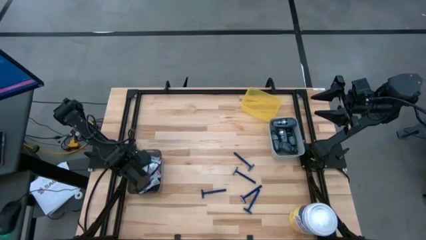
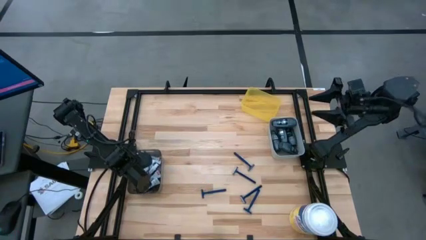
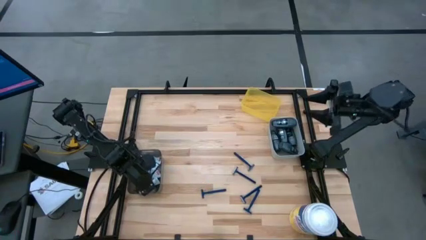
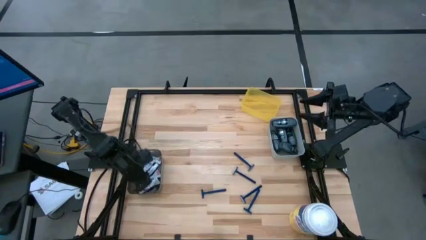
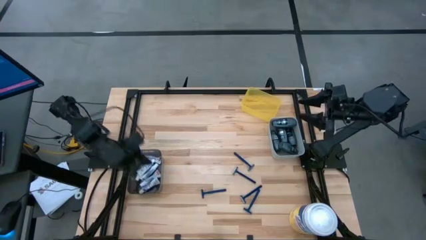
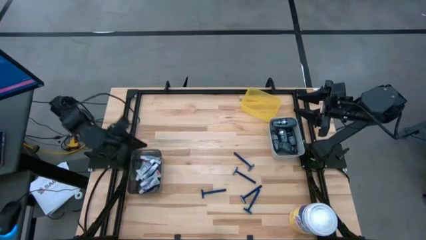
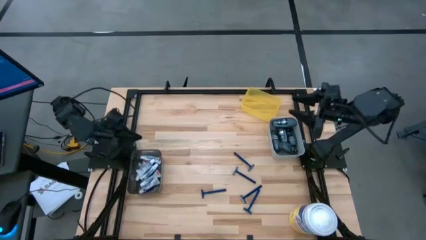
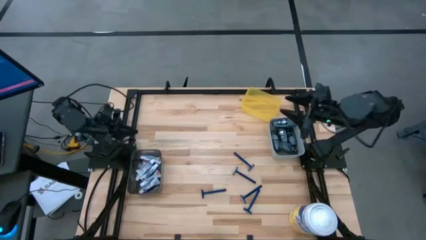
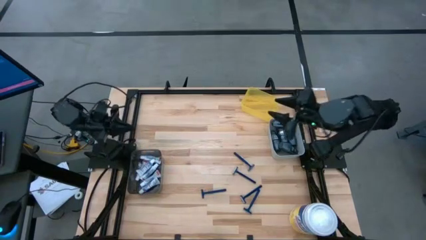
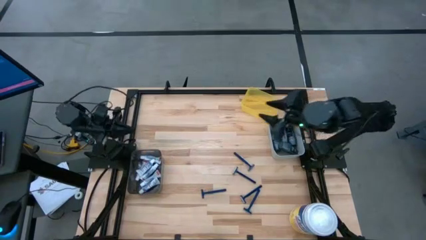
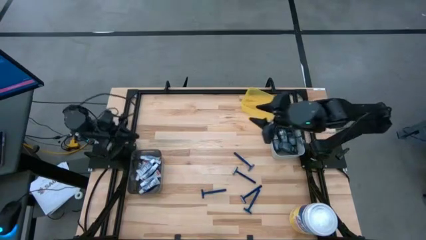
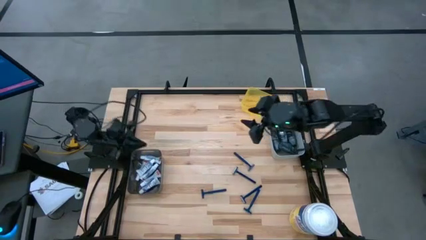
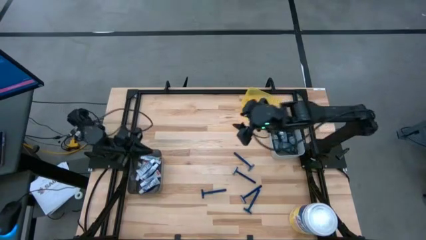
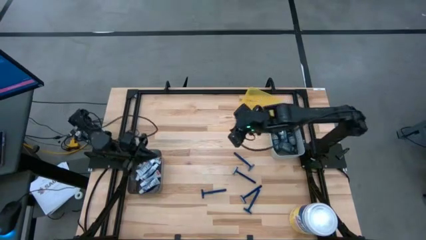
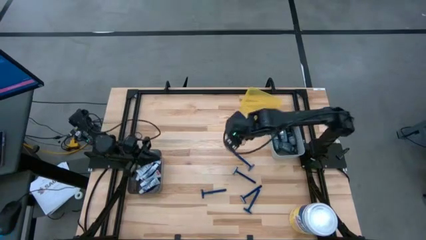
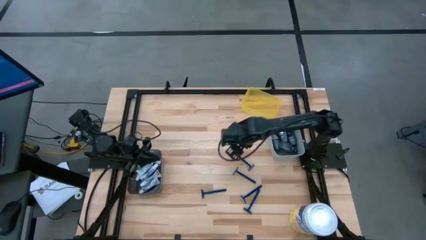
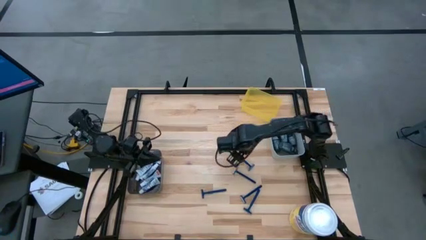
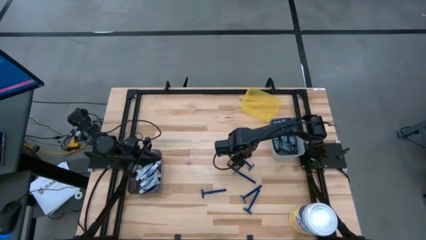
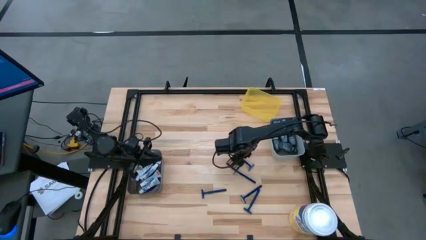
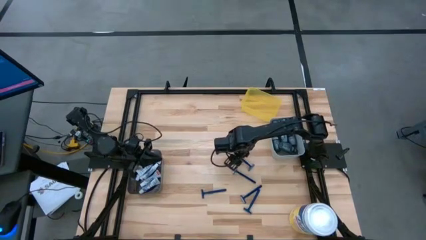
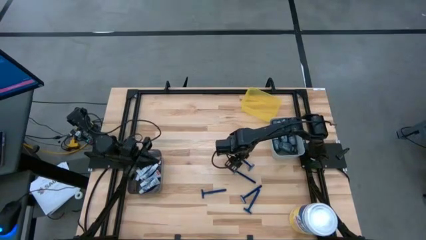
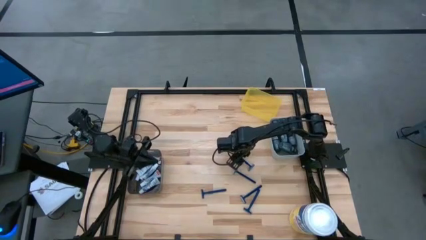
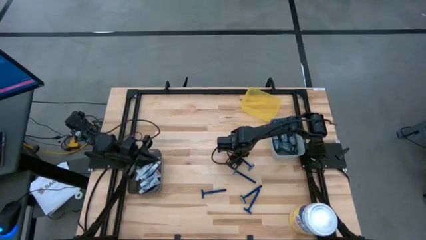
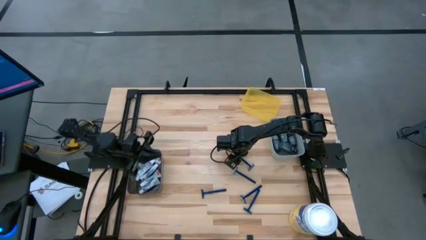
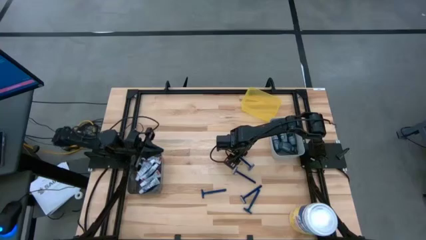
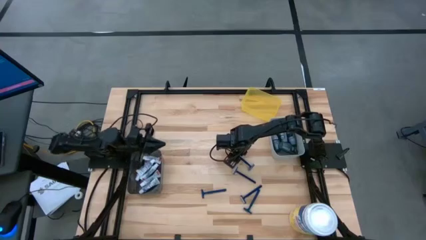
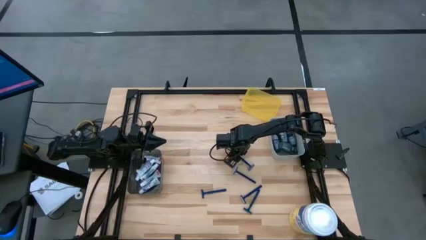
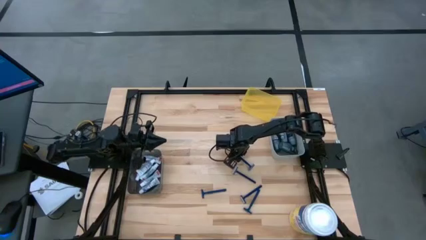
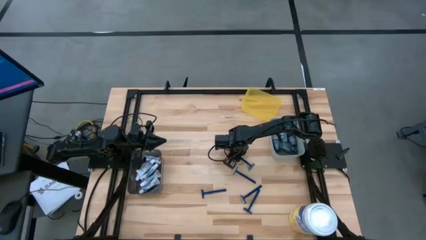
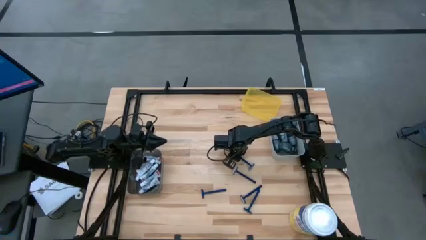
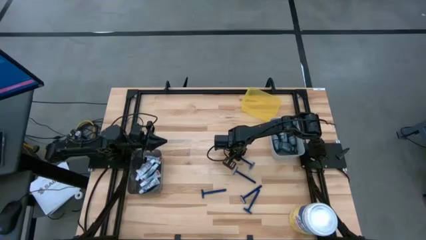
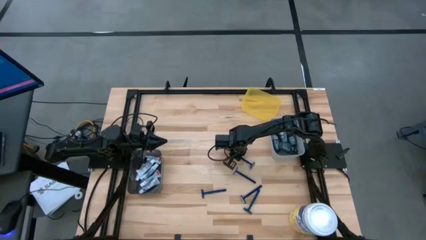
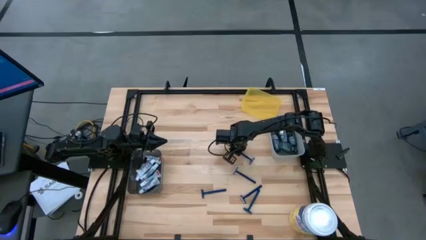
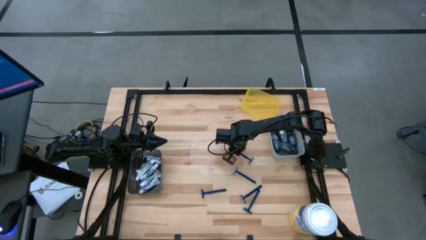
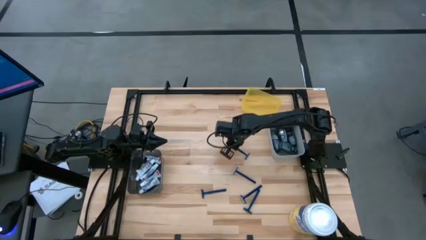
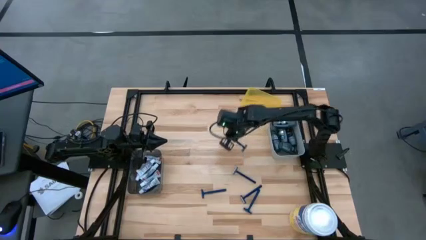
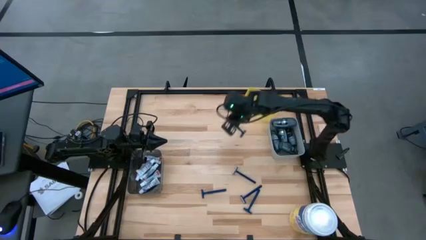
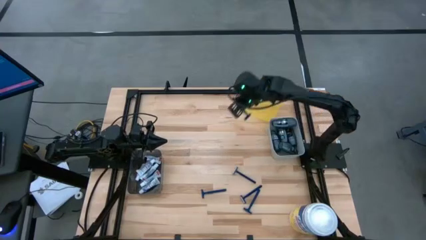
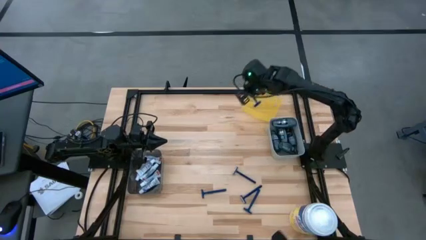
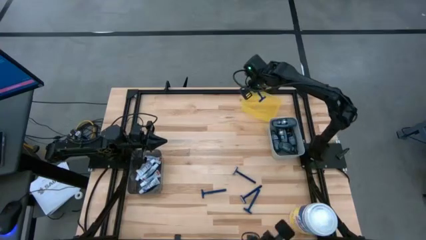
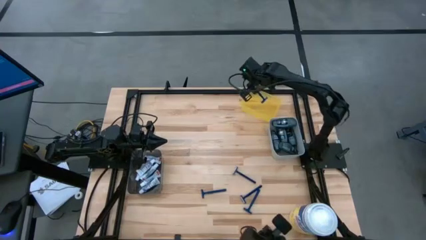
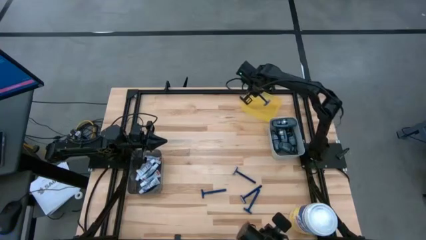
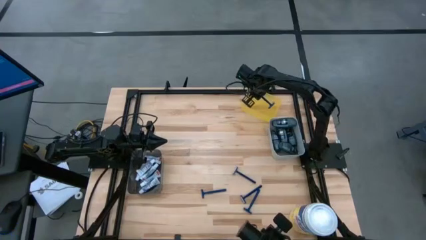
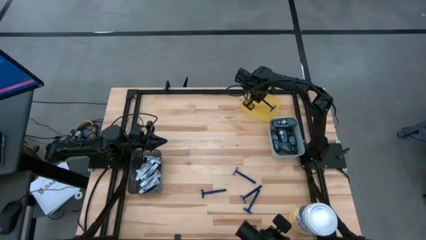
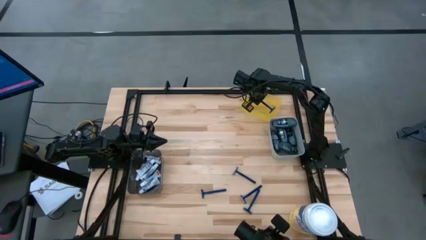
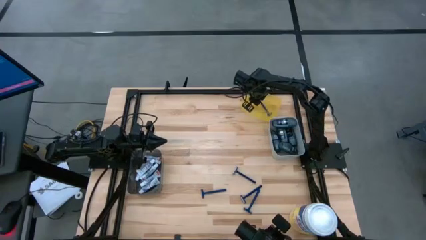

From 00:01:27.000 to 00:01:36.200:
Task: Pick & Place Travel size toiletries
Put the blue razor into the yellow bin

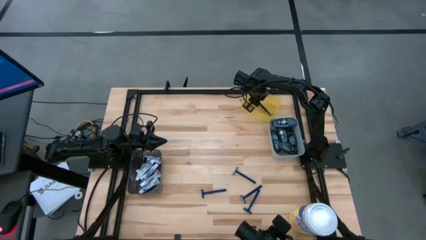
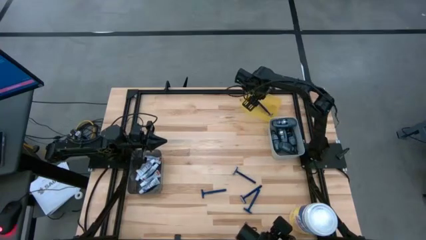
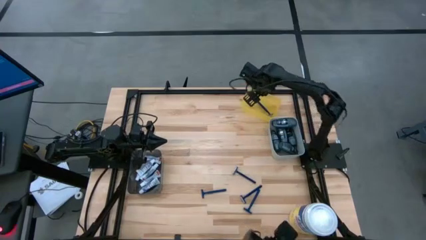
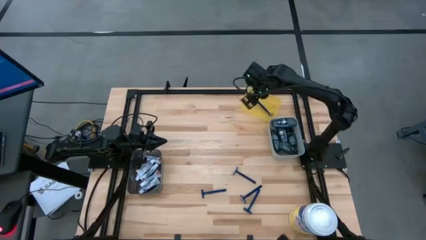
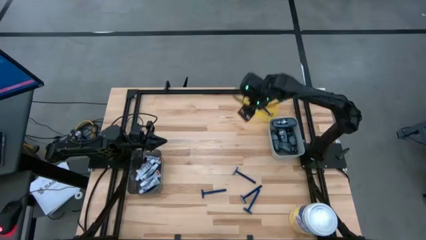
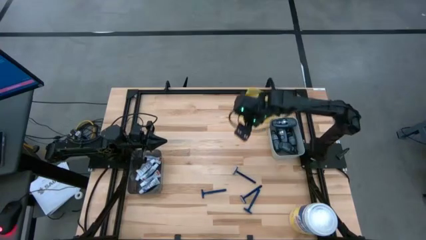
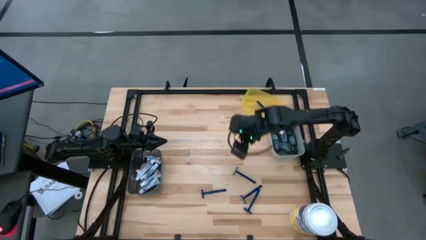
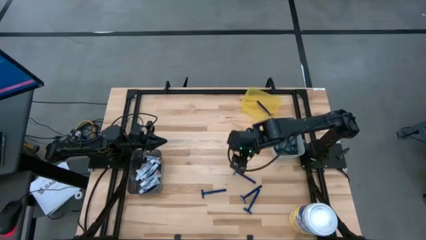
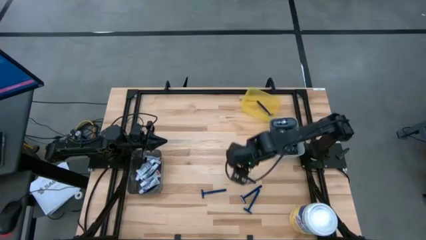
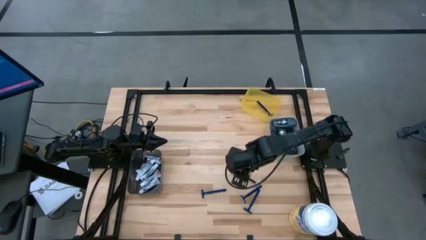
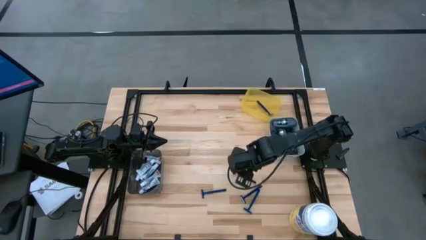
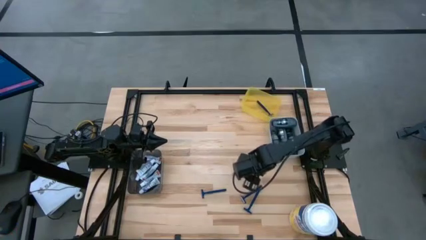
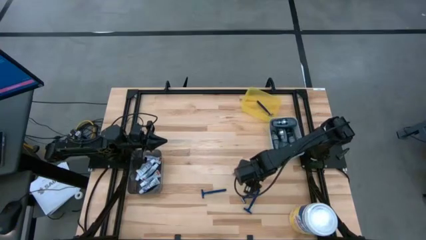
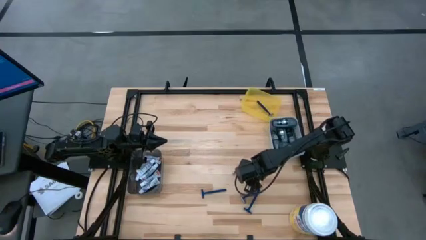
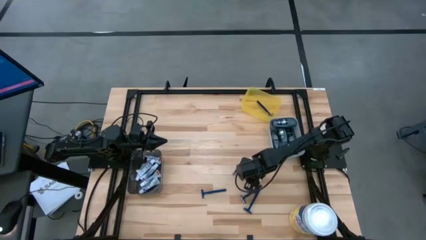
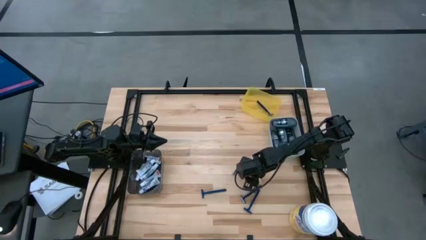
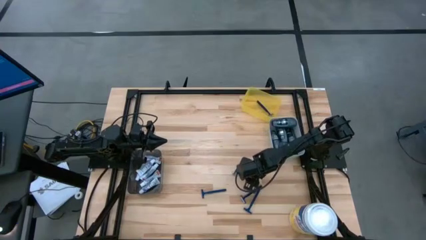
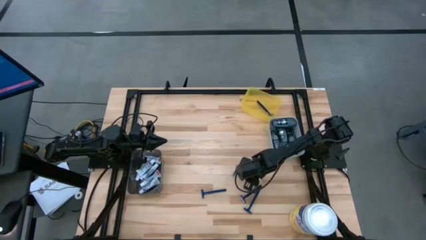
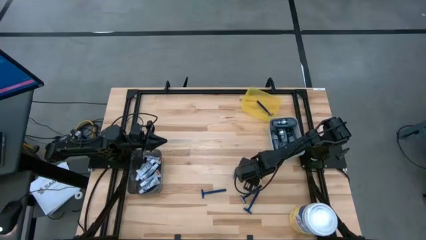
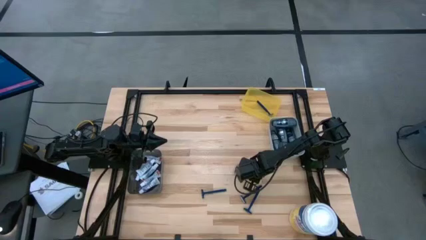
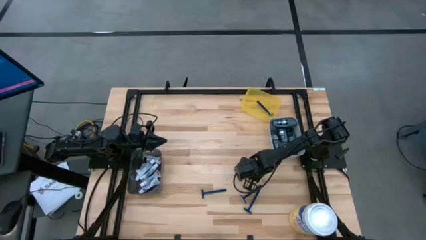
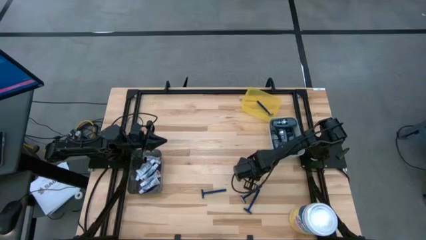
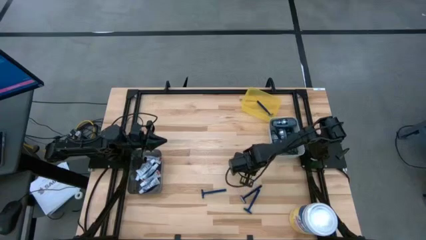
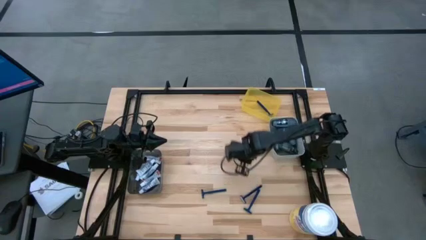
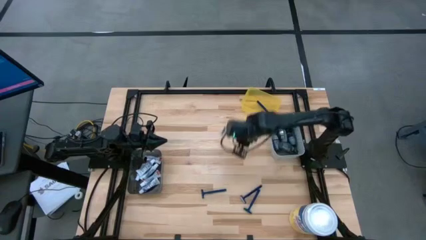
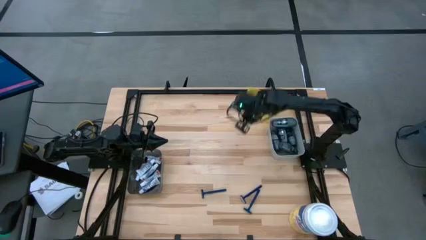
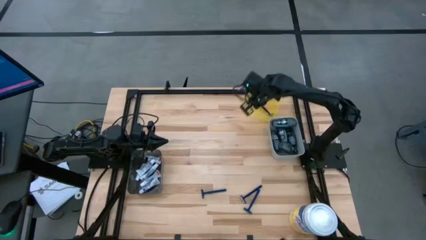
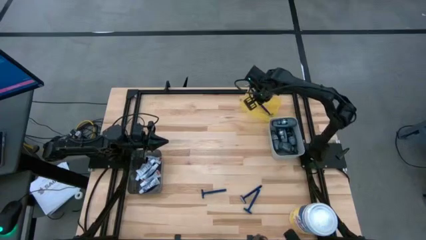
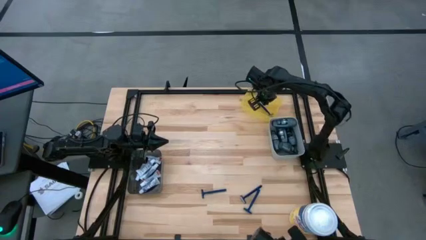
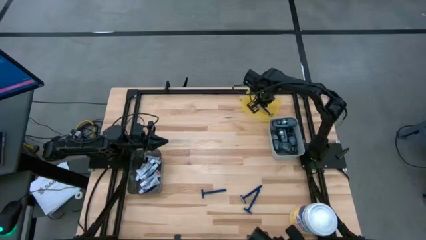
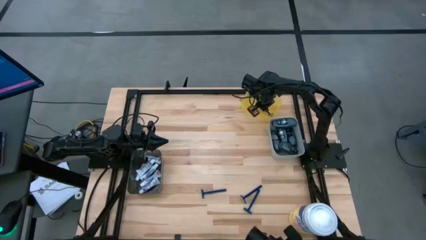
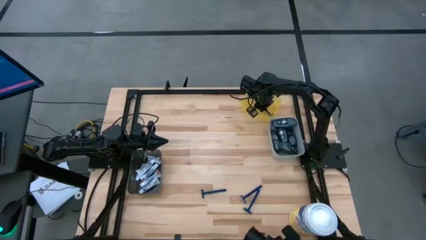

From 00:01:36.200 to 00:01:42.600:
Put the blue razor into the yellow bin
